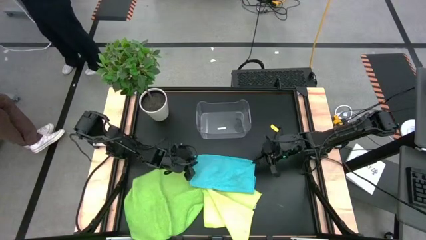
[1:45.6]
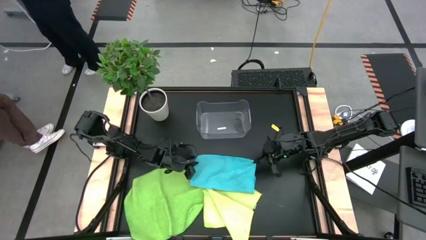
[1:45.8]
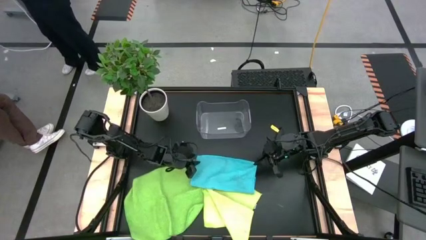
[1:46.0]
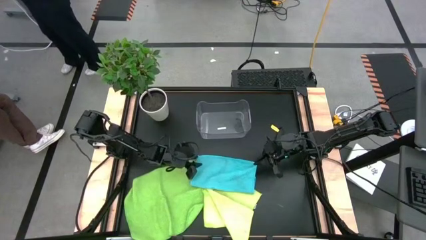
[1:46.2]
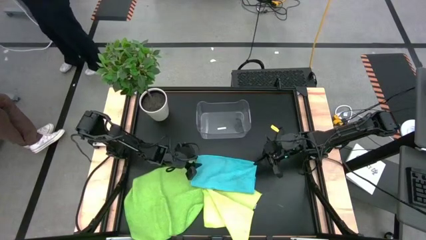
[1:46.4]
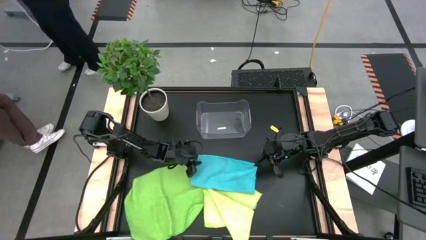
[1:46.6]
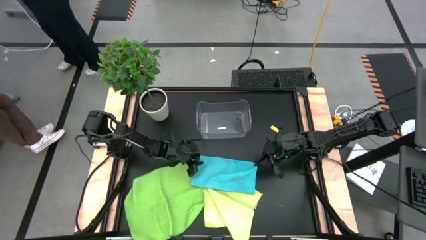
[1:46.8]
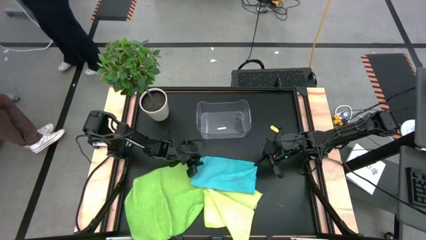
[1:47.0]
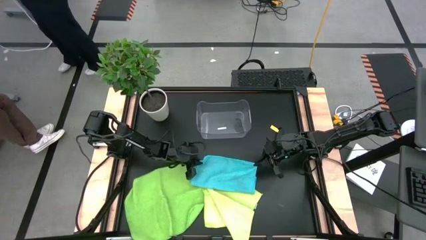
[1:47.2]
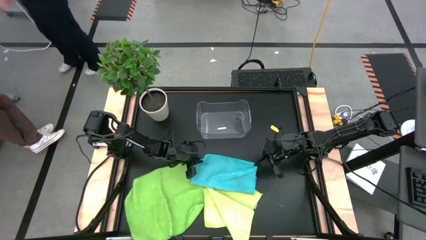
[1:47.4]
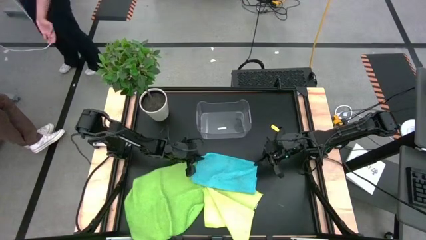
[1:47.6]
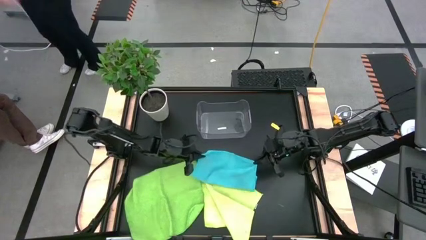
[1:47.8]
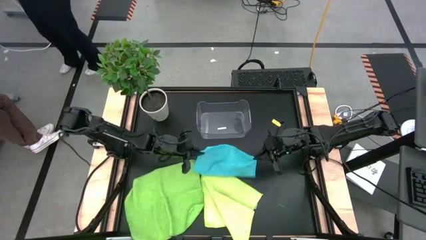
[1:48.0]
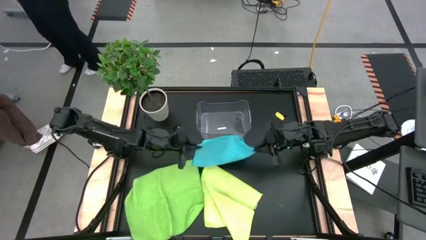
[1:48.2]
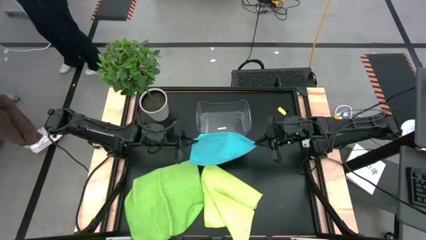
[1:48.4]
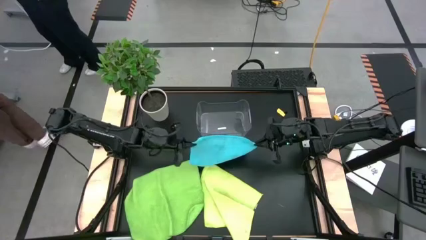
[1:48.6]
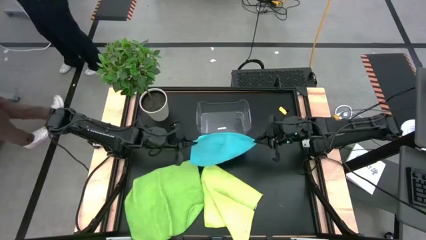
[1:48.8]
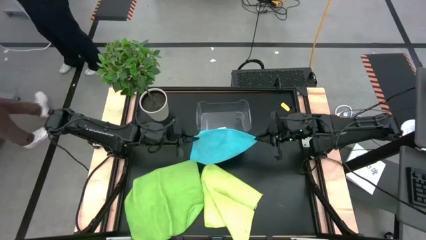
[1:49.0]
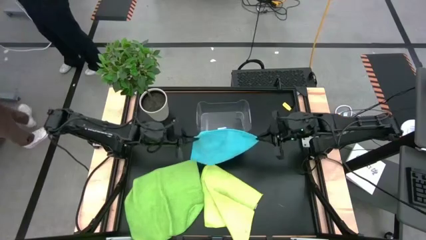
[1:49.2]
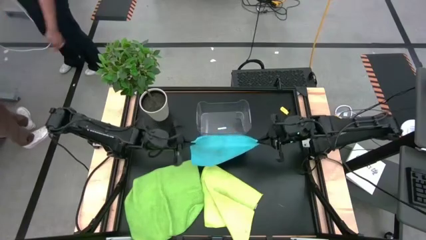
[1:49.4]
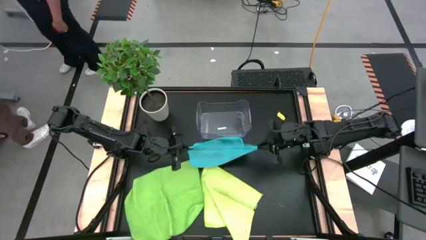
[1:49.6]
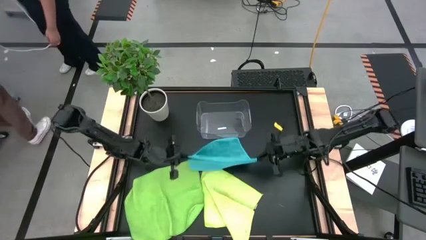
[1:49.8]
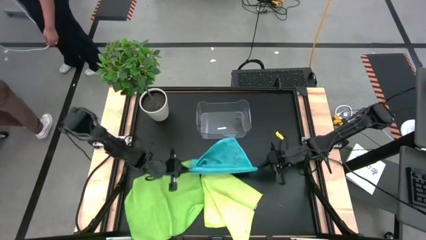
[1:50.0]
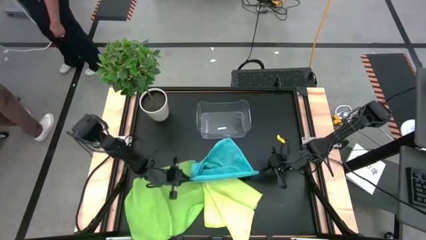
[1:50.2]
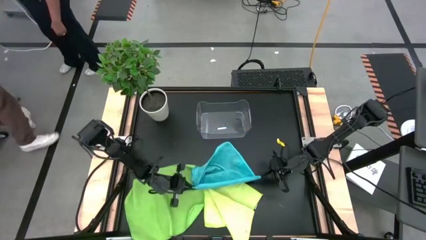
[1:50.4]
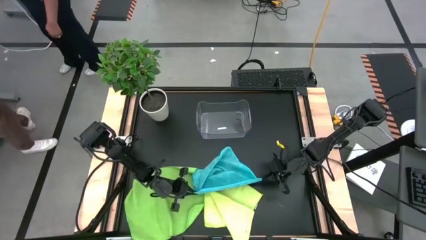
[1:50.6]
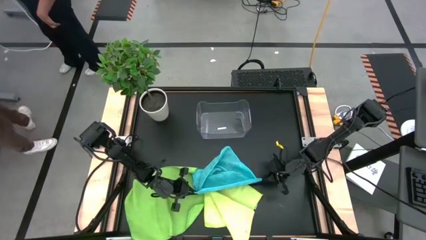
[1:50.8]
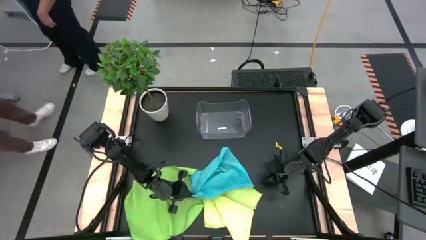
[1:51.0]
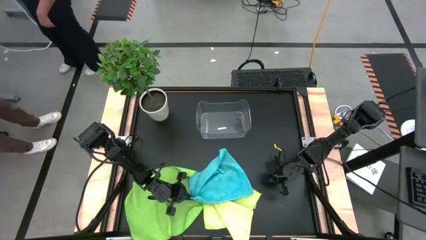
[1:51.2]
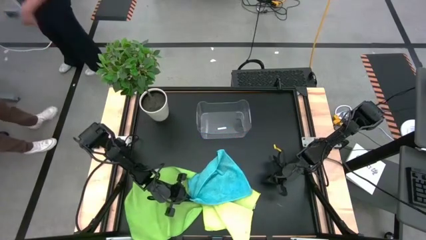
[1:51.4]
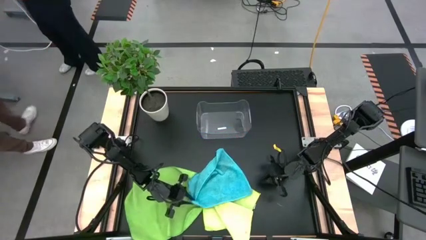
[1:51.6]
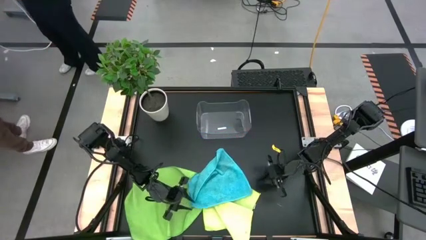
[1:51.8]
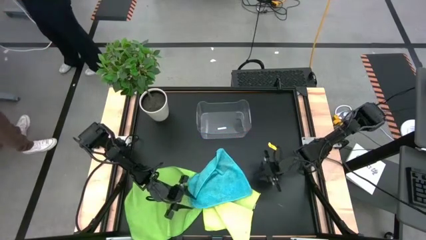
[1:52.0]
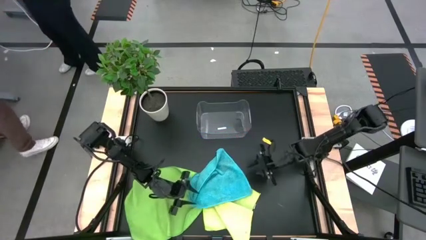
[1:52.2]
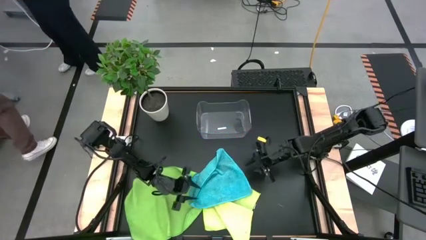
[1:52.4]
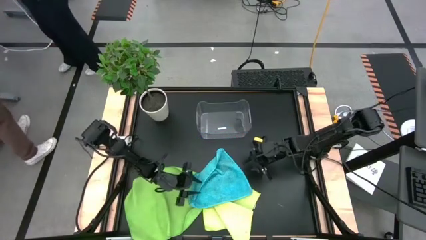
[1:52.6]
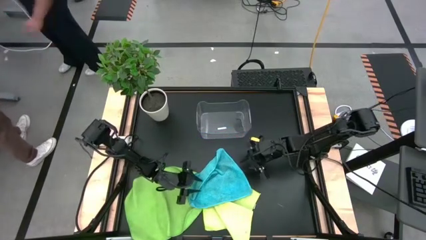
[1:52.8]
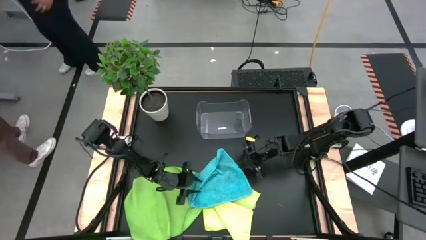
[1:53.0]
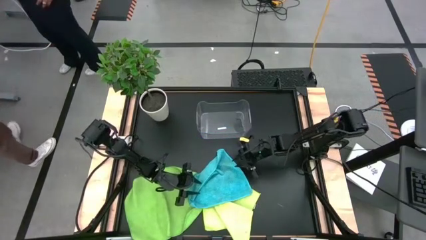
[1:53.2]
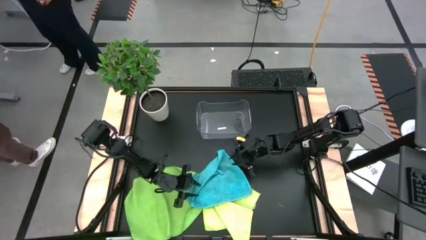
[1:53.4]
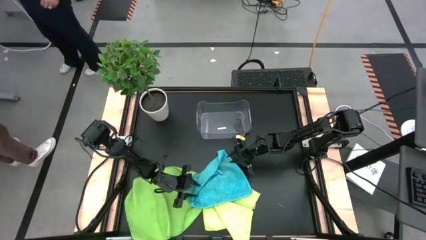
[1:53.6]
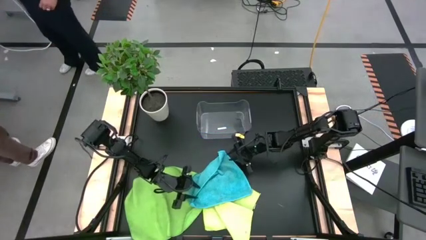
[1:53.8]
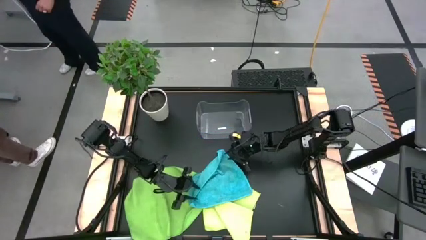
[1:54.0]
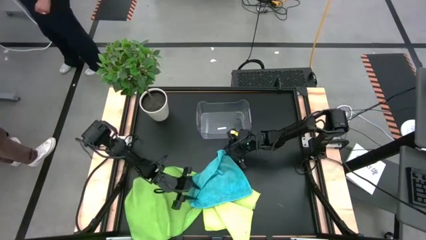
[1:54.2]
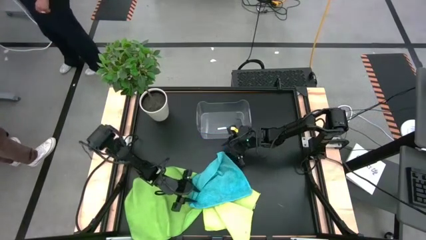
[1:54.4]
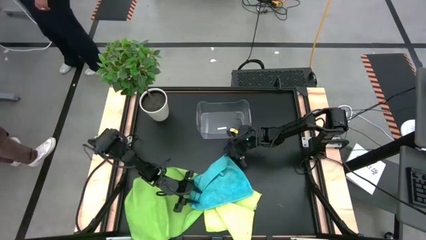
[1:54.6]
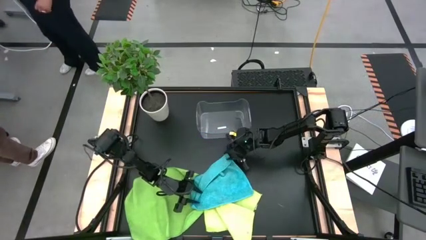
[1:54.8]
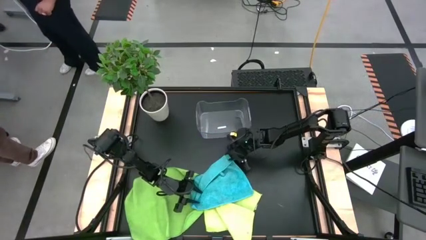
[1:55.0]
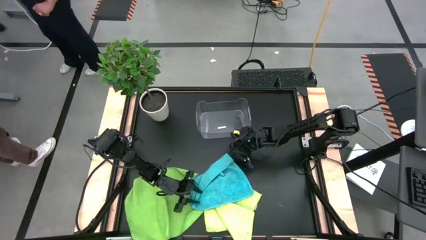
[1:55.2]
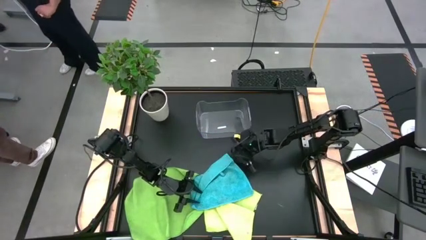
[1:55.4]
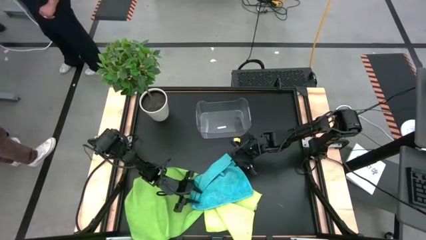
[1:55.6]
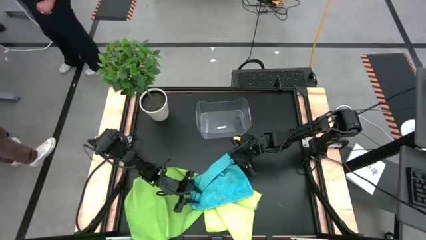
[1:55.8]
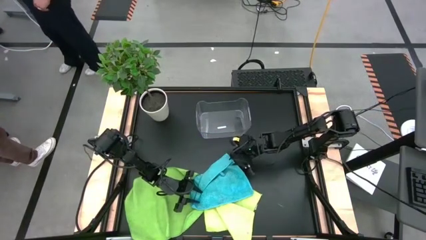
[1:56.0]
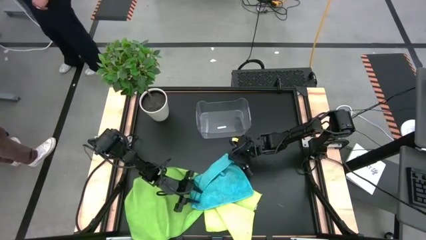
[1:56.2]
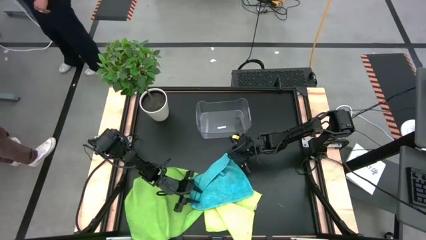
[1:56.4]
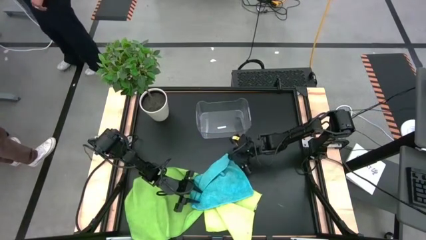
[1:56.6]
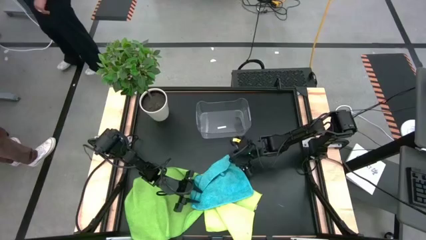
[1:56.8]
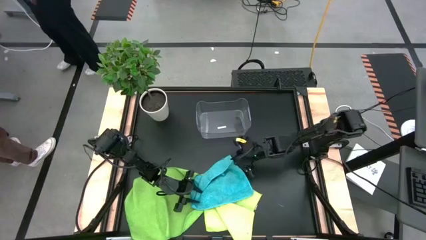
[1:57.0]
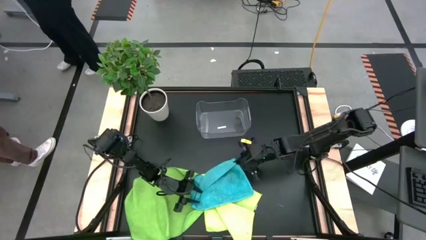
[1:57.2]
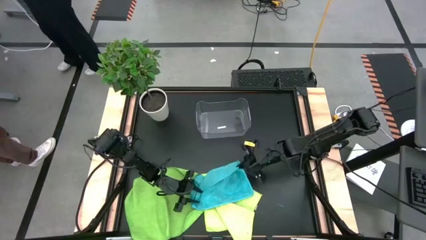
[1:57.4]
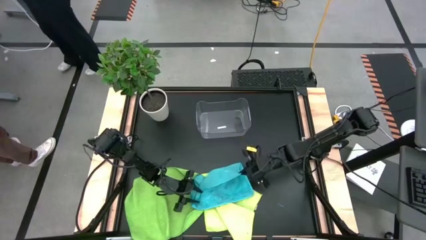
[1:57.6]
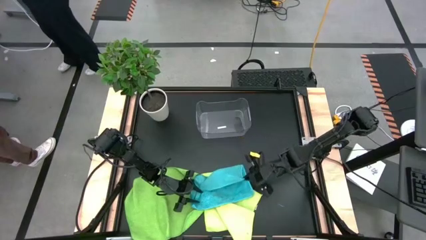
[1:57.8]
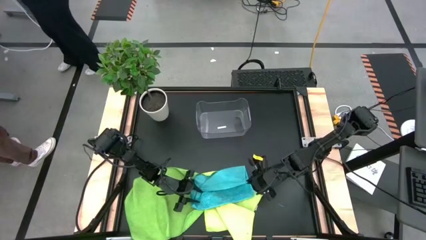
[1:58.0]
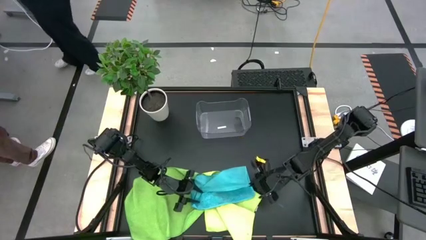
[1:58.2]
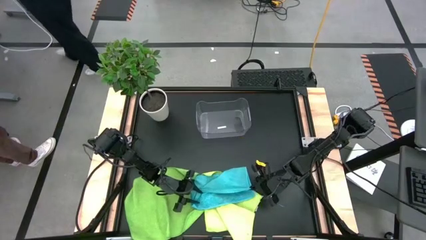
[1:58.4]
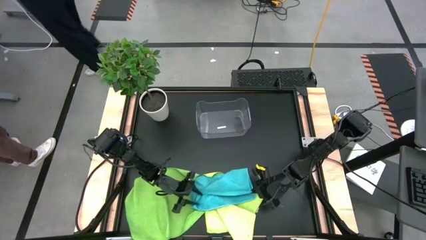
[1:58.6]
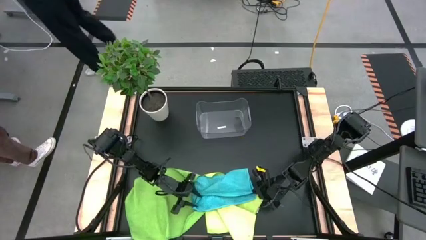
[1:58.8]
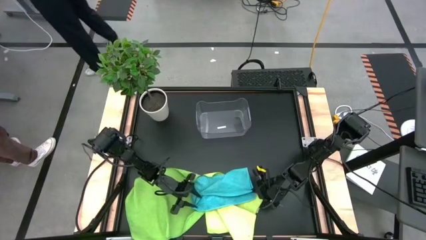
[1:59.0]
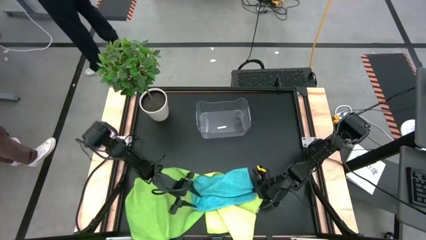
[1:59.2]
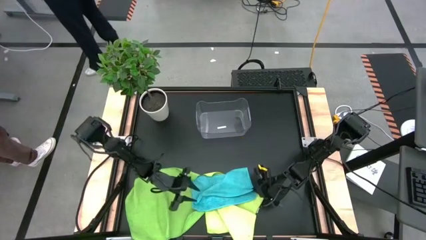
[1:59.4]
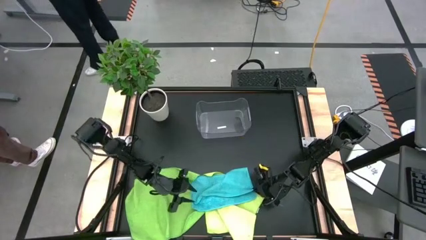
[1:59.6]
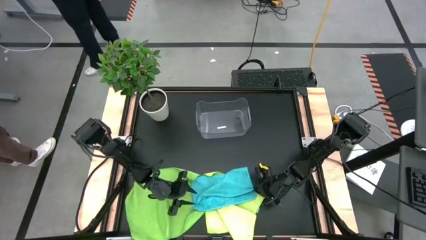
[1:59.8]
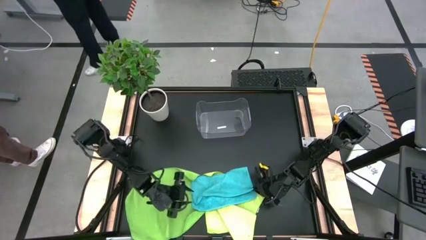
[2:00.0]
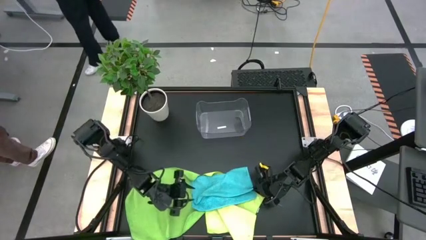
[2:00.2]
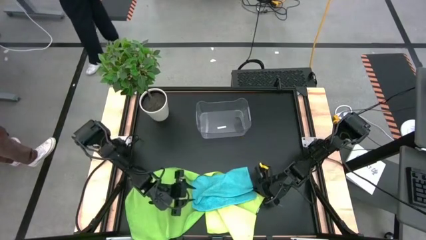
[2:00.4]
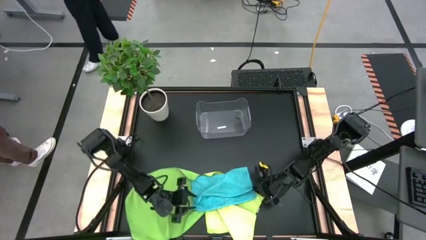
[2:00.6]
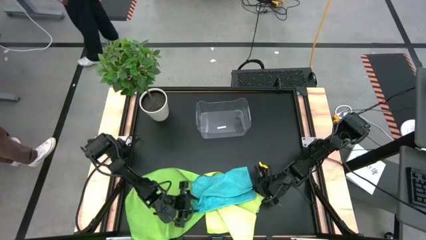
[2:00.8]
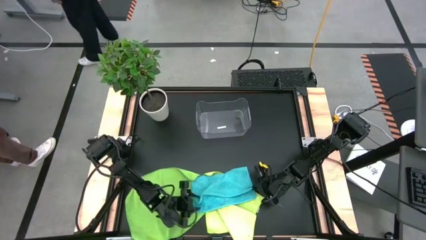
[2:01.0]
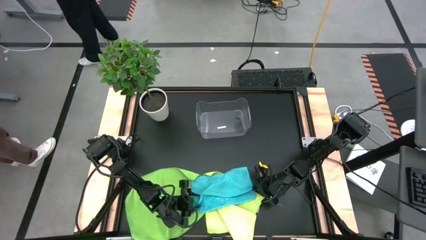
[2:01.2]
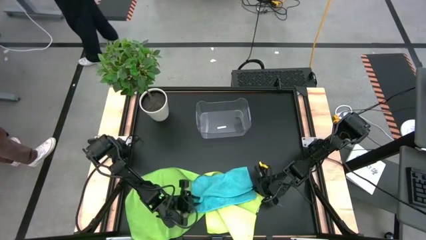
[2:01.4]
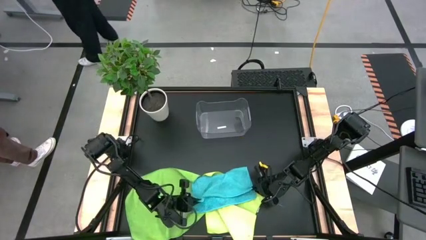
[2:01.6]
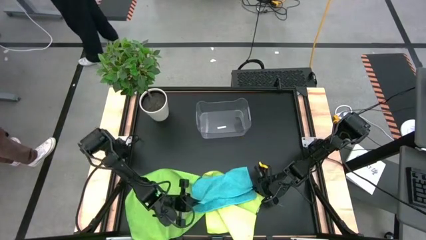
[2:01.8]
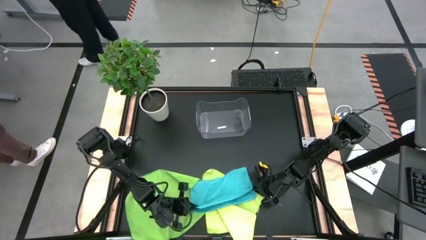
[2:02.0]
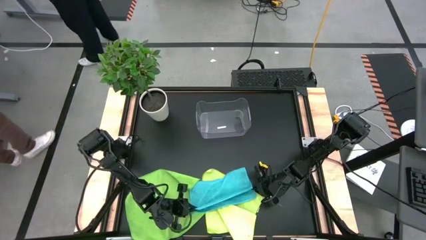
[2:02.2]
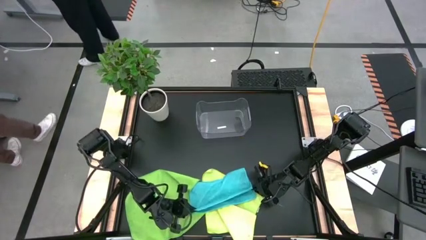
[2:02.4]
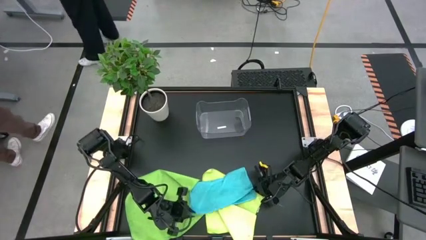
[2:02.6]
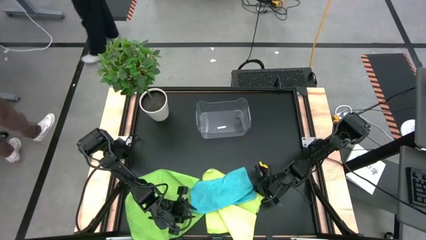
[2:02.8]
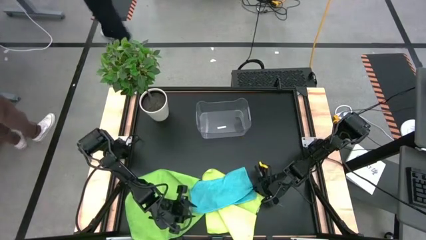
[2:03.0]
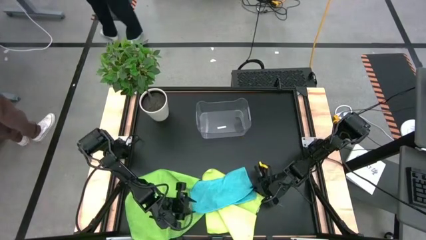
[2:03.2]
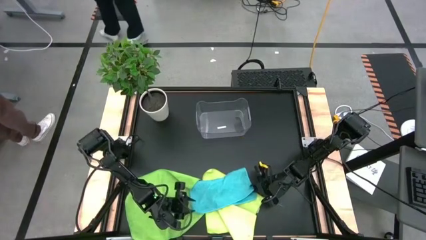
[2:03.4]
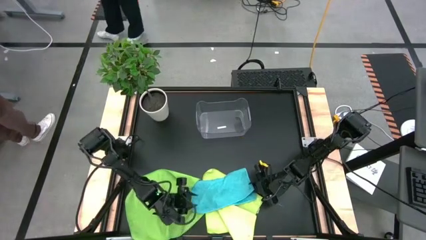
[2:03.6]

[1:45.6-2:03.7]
Task: Fold microfiber towels
Fold the blue towel
